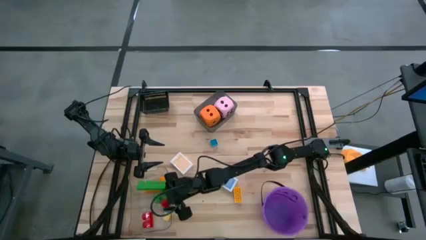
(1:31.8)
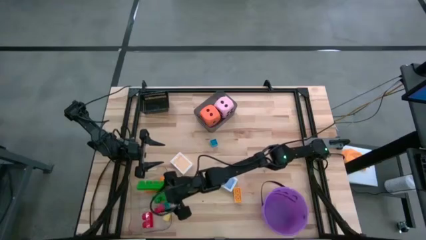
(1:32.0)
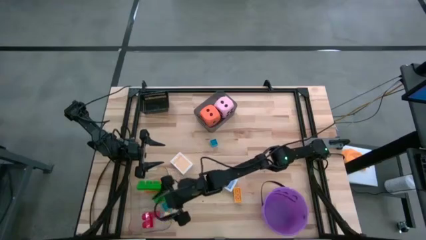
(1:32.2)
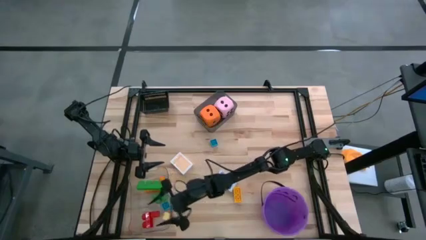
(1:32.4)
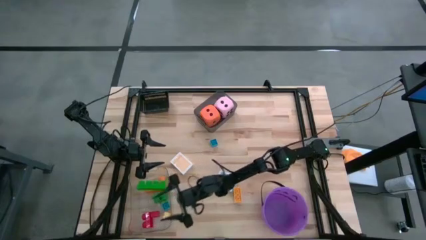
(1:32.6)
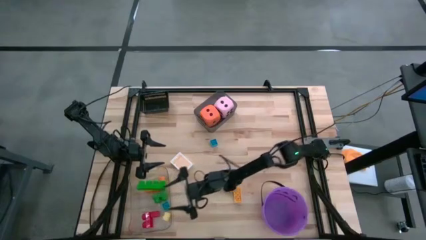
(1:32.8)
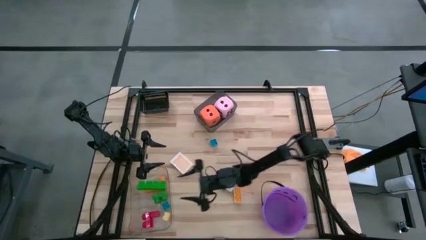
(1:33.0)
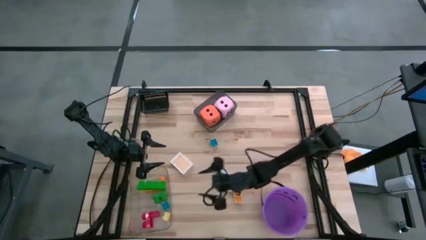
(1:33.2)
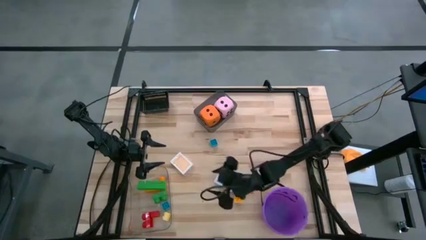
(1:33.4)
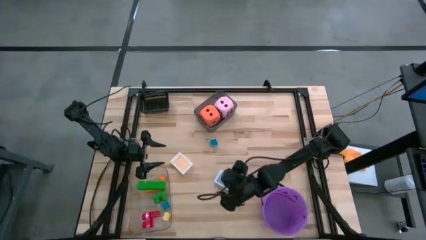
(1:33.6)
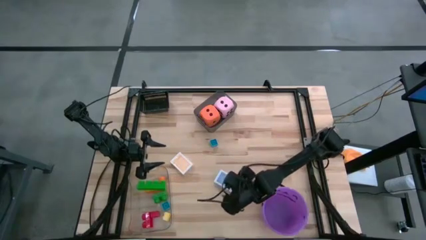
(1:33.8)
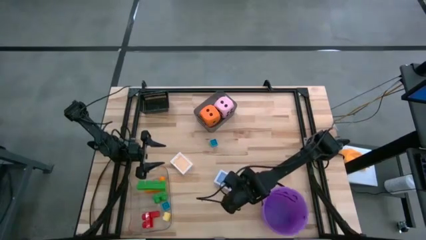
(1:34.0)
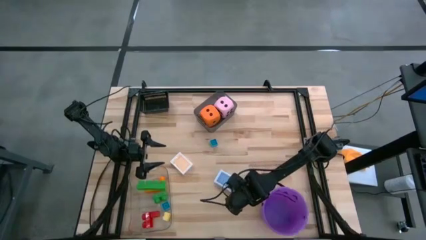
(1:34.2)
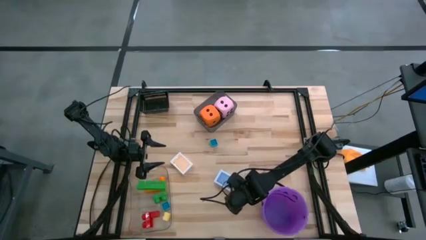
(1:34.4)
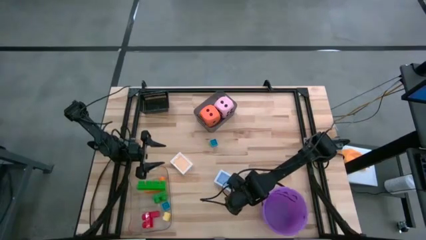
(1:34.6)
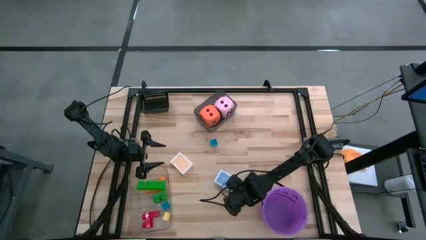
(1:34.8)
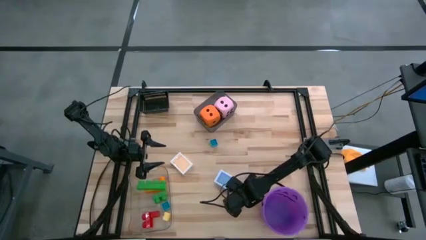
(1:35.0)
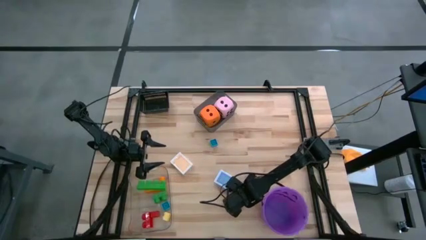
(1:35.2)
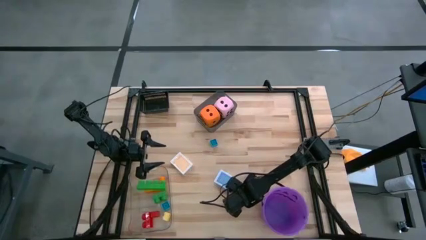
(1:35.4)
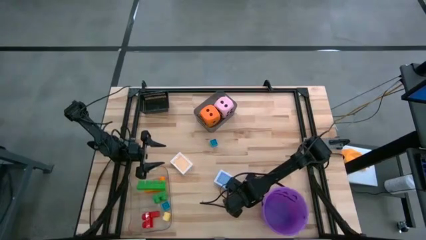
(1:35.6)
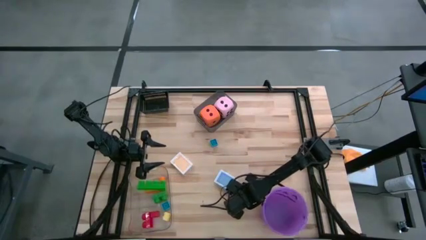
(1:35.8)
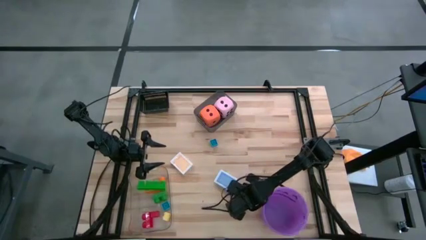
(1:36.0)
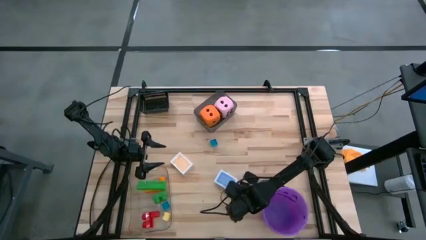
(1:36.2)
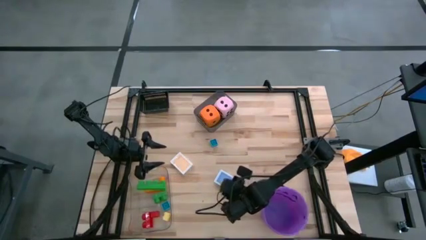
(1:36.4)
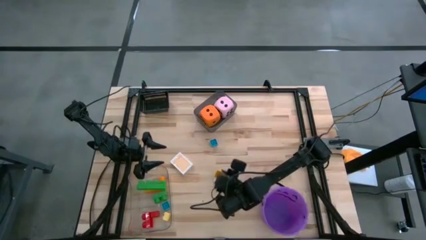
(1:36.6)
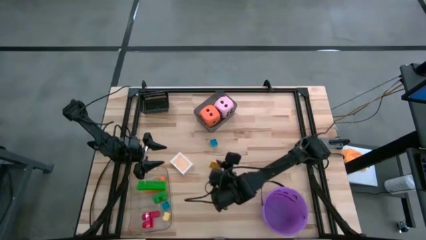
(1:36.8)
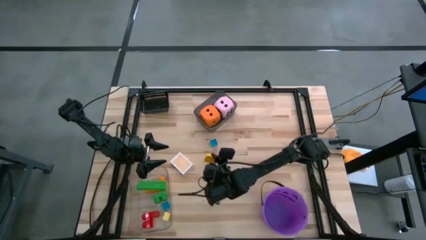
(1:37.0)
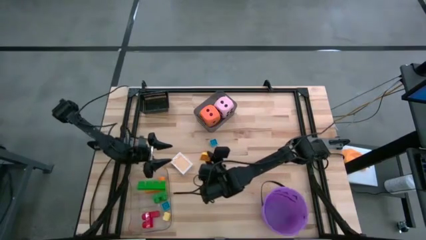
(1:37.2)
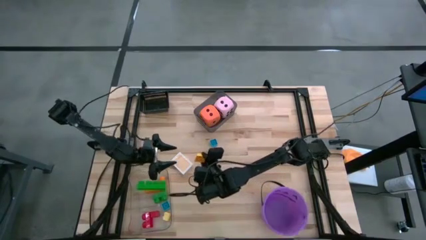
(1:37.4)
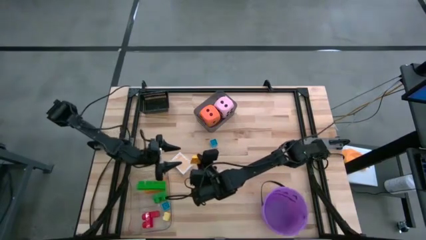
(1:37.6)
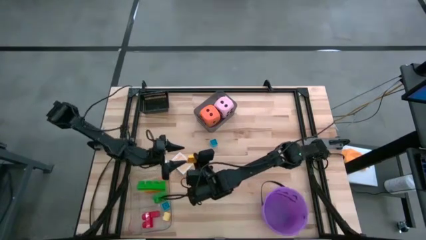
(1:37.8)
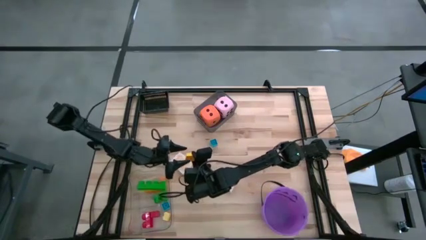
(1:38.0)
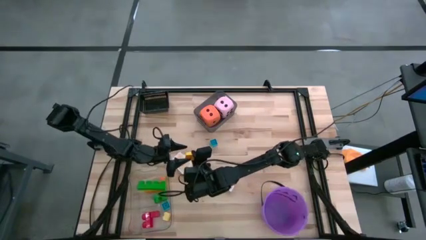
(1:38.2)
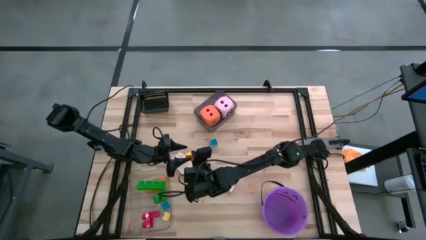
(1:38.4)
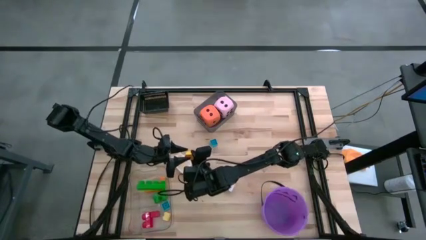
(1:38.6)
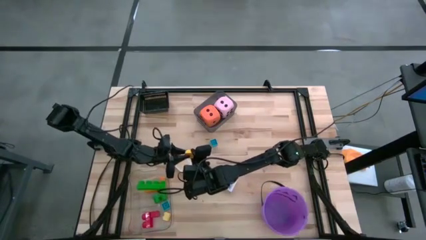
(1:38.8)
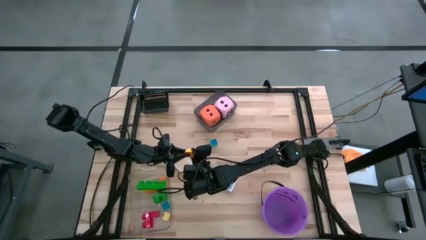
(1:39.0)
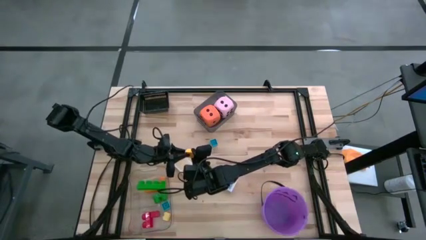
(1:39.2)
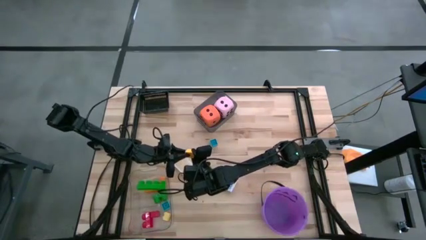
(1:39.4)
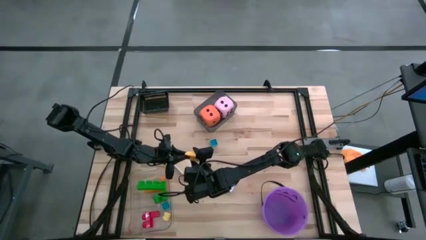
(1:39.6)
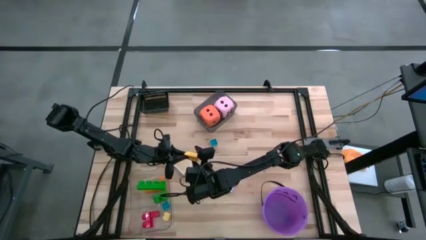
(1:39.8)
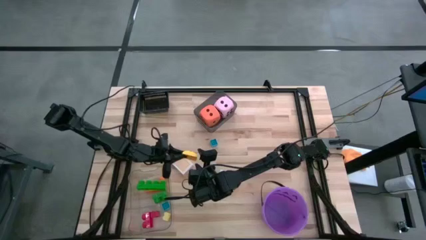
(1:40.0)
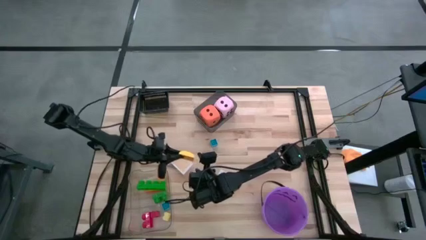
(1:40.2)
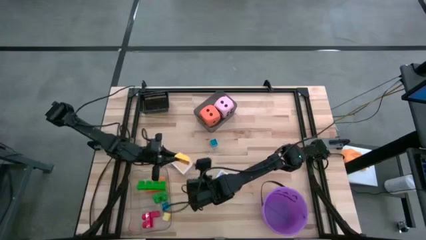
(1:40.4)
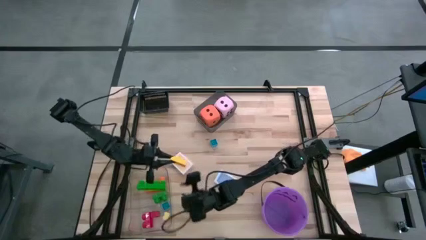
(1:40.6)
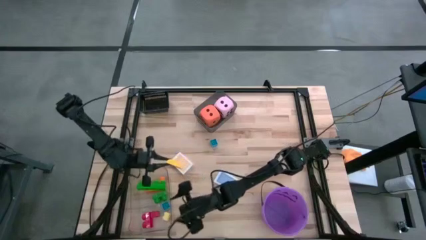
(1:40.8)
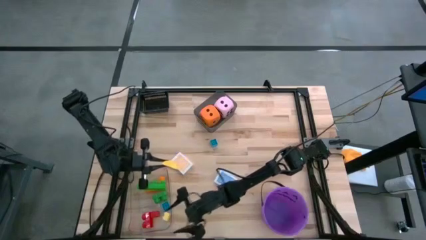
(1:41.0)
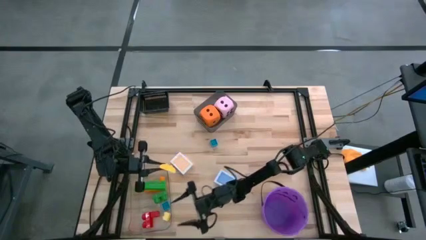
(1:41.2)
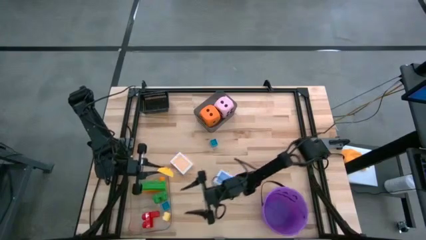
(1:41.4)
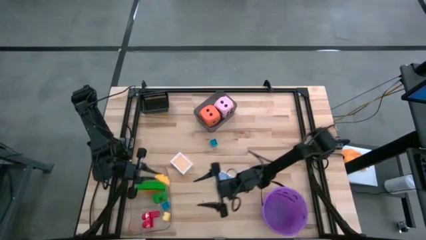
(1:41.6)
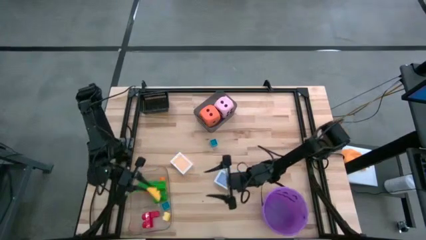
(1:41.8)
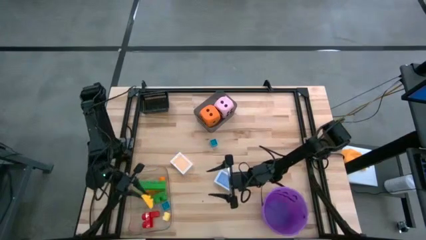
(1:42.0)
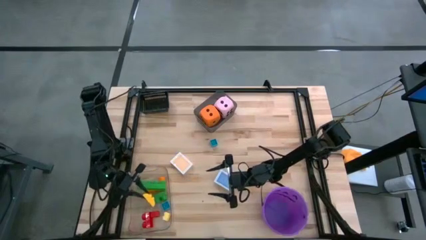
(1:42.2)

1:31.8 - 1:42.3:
Task: Pick & Place Toys
Put the yellow game piece into the transparent bin

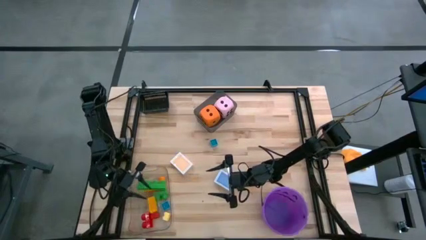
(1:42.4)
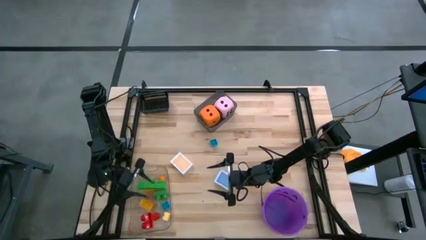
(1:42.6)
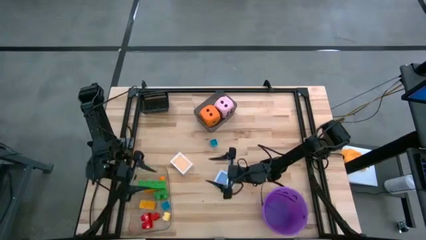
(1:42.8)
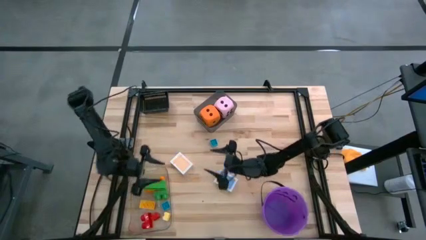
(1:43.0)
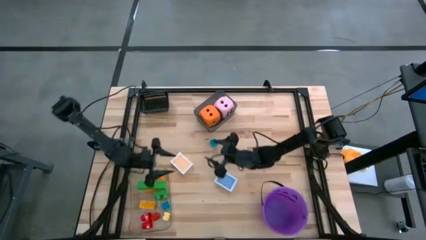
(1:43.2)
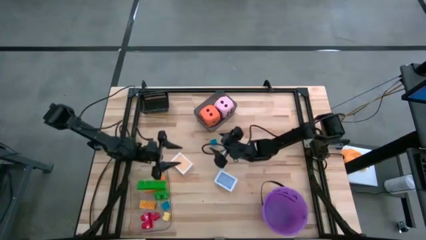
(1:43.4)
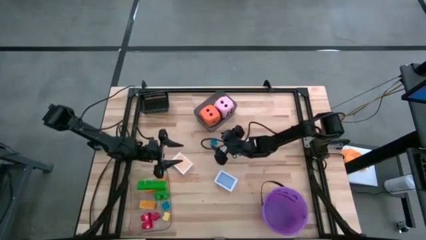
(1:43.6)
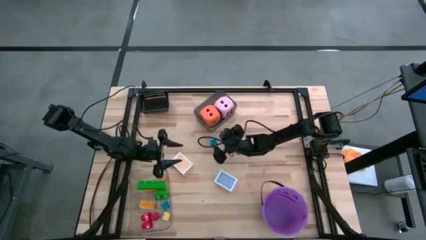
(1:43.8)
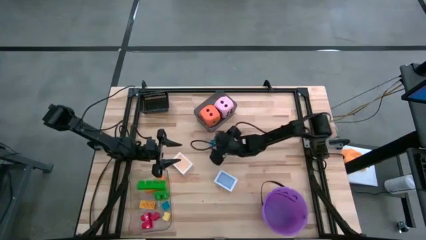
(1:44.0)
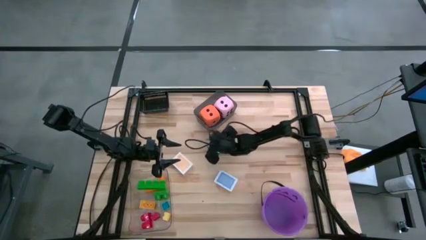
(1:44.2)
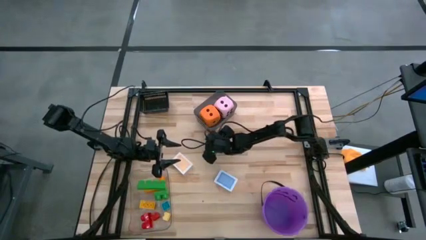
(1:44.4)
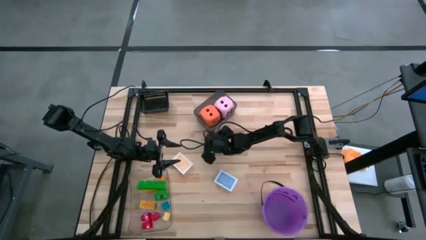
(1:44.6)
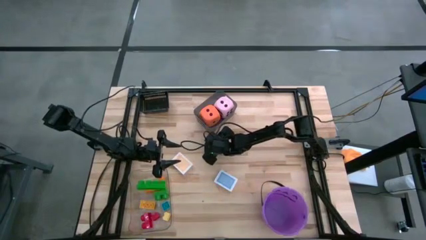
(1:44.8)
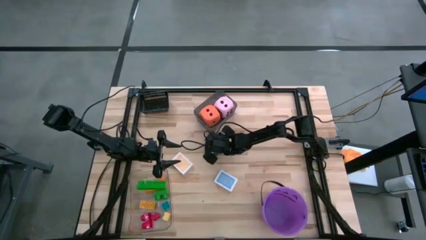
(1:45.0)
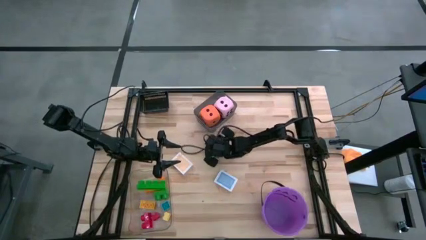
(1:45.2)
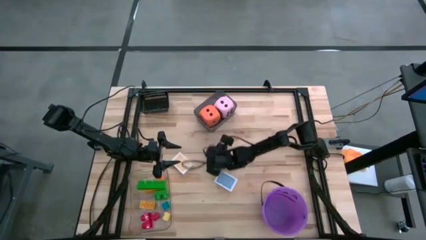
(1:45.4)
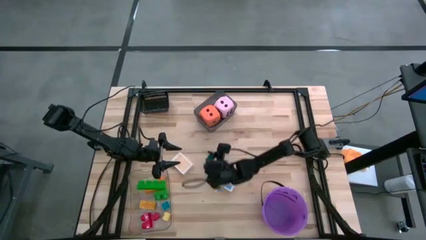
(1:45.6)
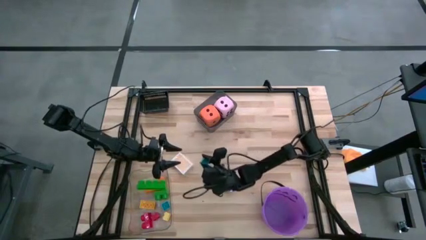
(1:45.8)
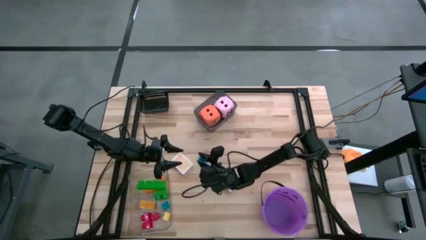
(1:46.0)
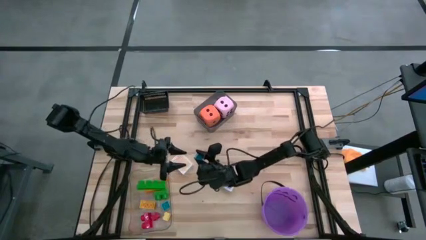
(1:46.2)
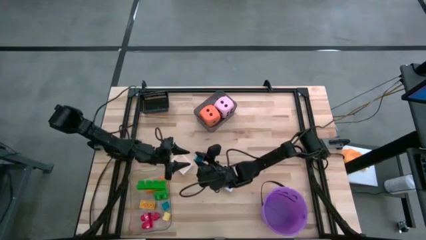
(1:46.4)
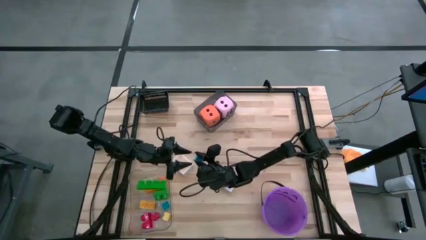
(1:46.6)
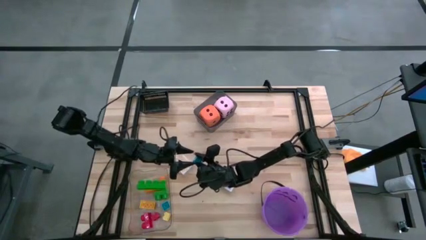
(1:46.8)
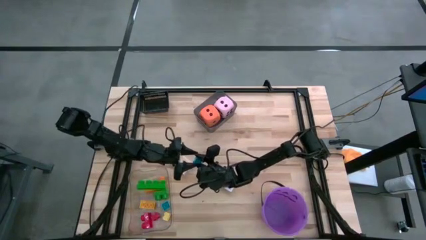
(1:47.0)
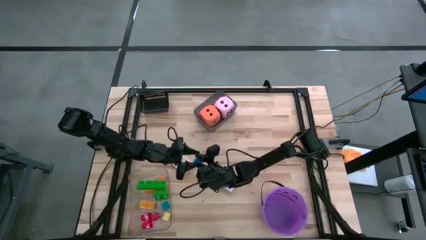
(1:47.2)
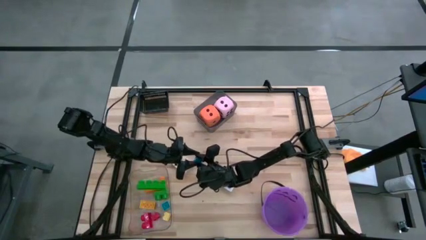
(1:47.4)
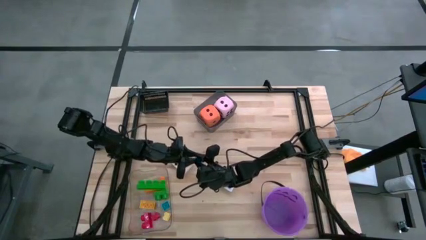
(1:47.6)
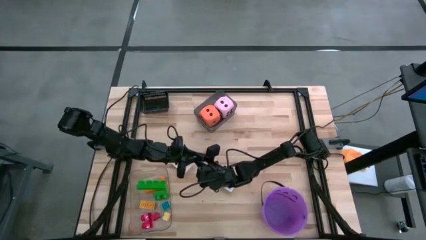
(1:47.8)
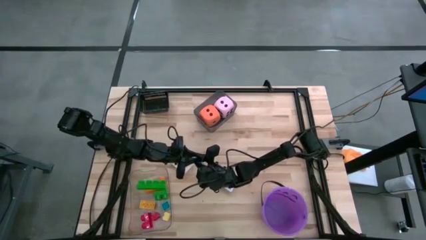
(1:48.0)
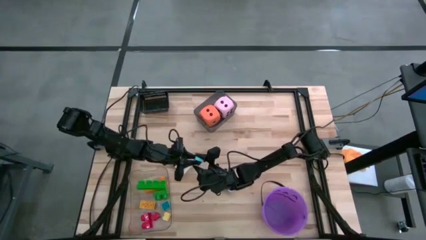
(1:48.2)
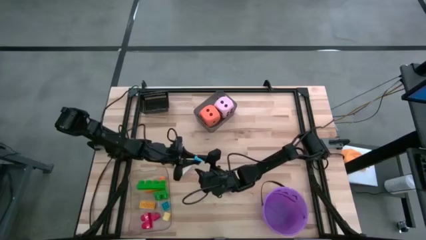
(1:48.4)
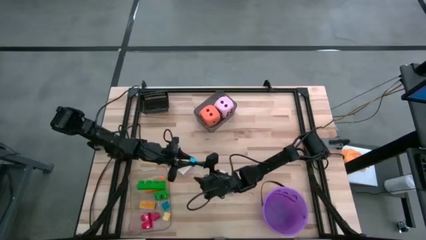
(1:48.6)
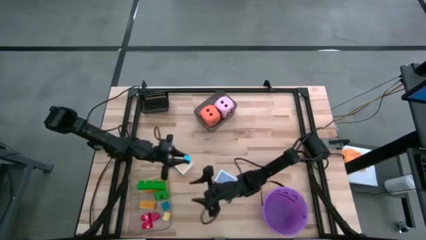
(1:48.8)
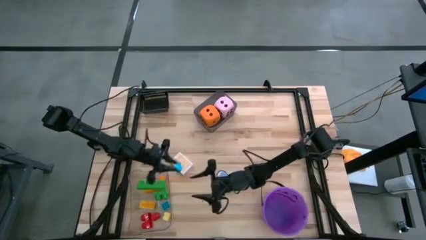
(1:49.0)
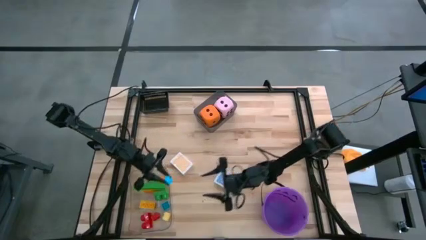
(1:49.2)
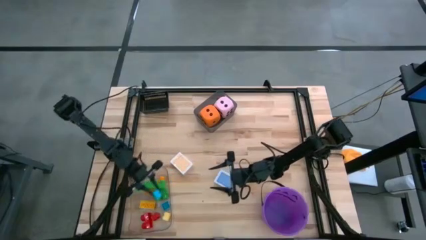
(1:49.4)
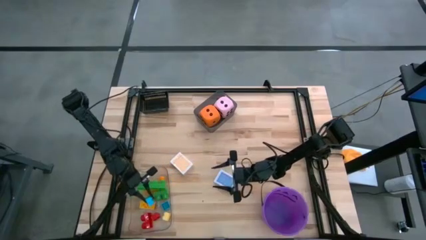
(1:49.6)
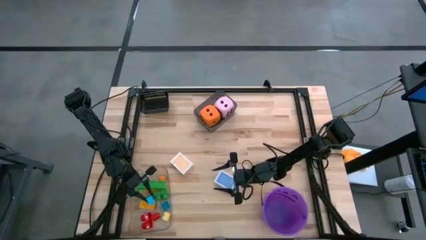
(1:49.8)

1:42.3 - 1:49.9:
Put the blue game piece into the transparent bin
